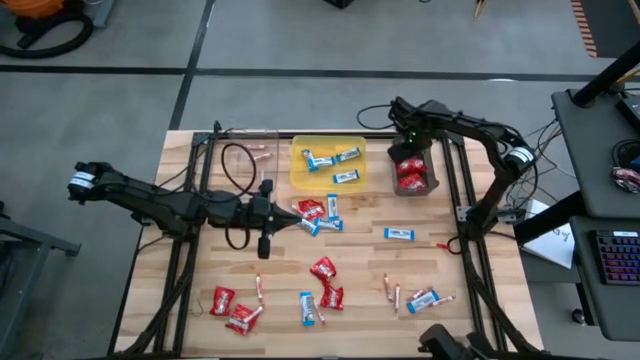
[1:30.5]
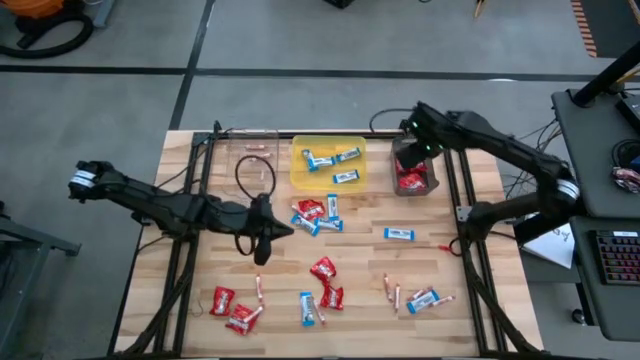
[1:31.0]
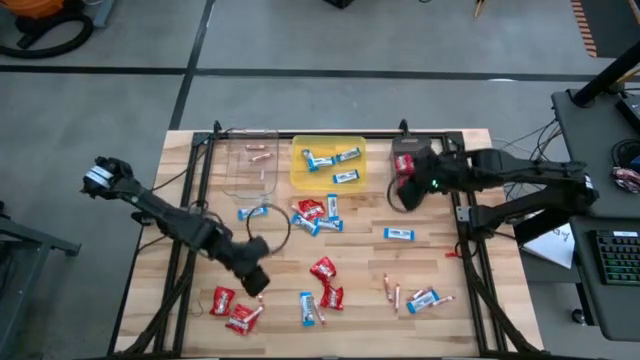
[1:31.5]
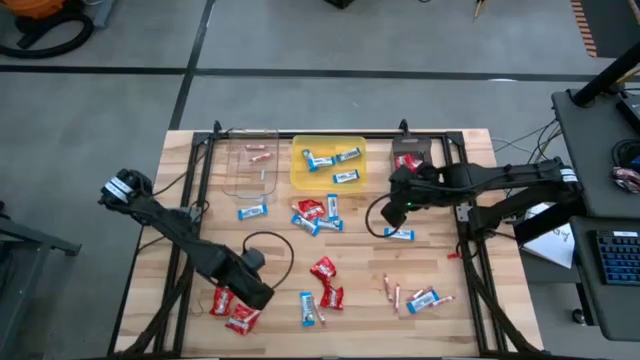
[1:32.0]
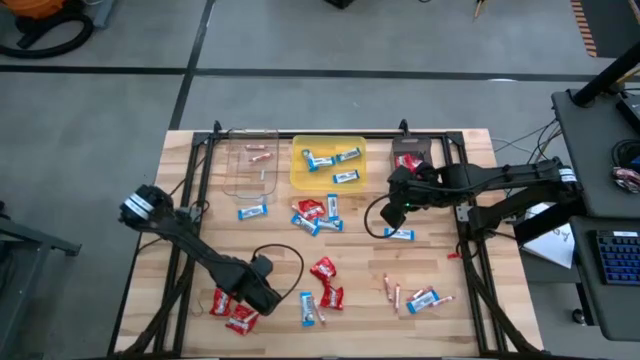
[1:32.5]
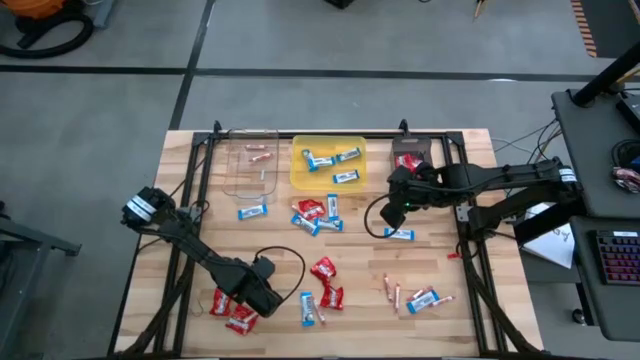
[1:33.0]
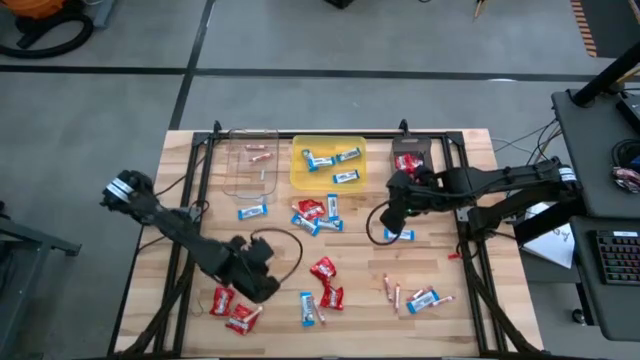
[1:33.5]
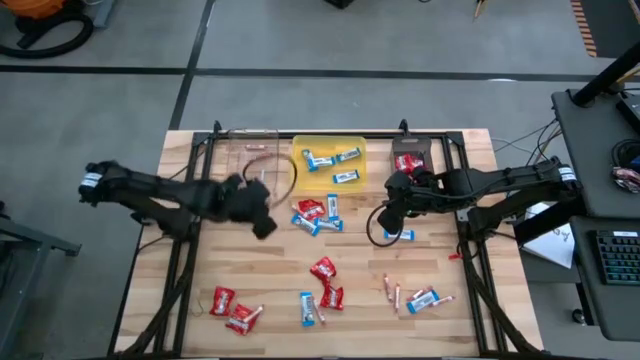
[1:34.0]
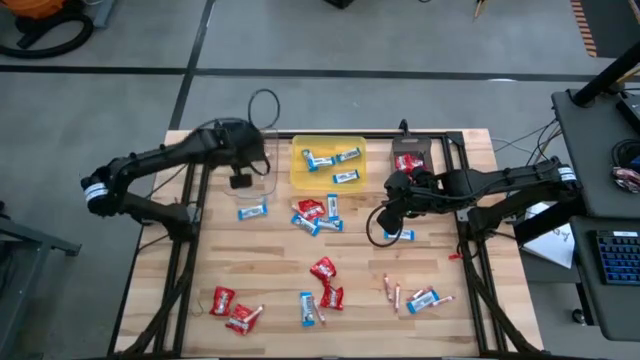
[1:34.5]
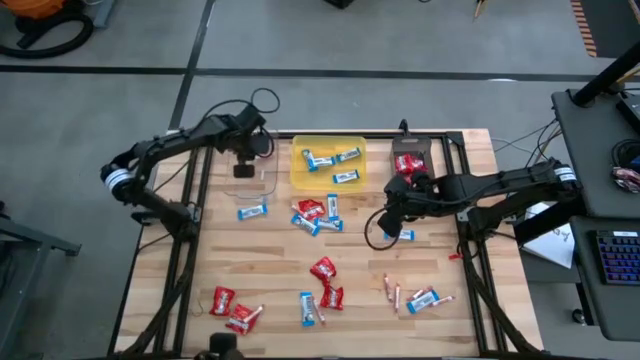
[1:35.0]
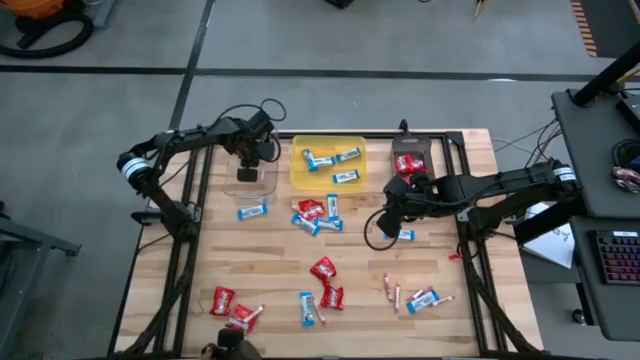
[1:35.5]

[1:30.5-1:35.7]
Task: Sort candy
Put the orange candy into the transparent bin

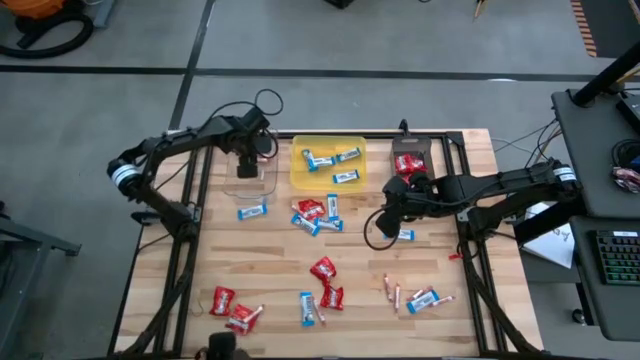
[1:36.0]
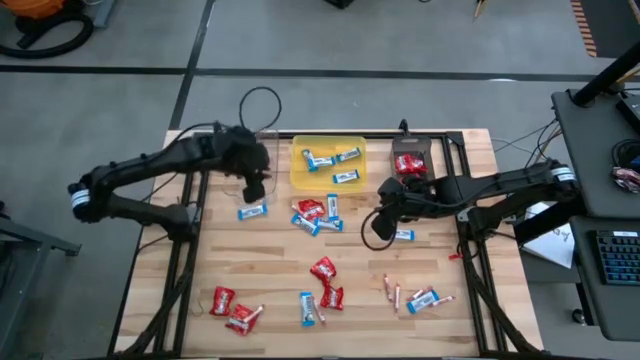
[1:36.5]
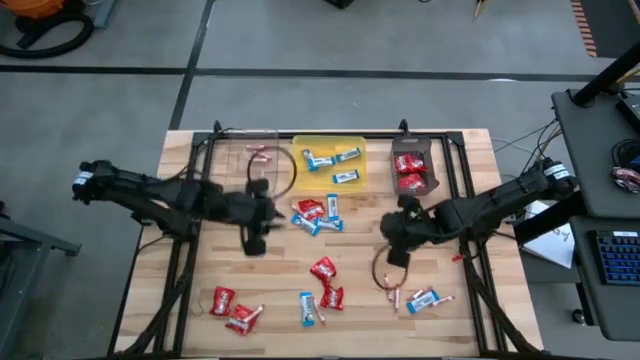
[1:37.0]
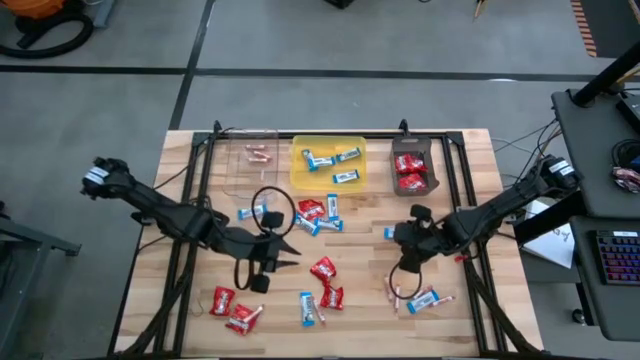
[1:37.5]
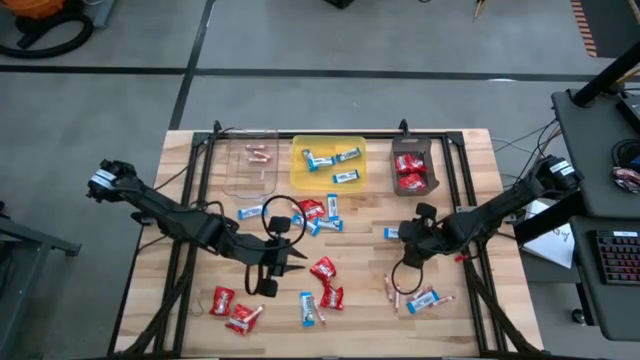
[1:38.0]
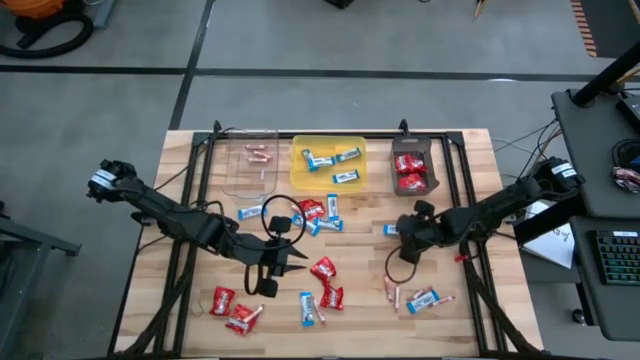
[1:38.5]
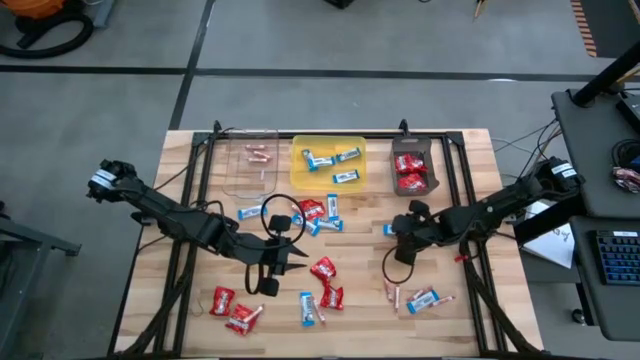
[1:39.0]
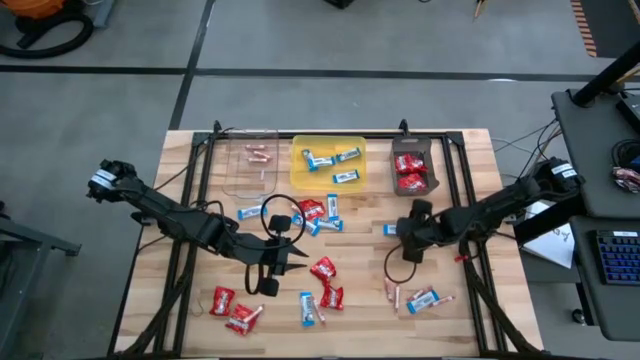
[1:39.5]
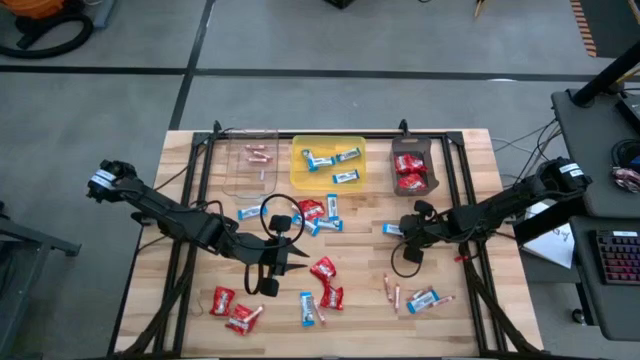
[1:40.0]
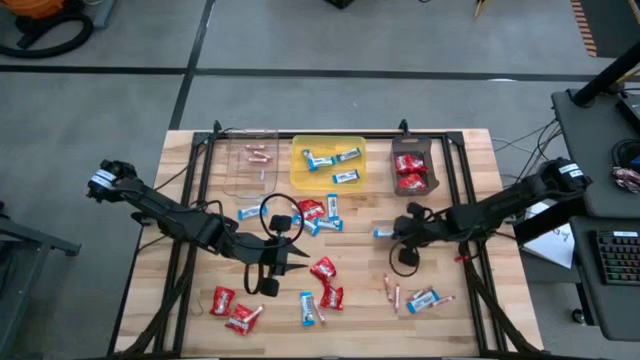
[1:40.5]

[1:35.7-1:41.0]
Put the white chocolate into the yellow bin

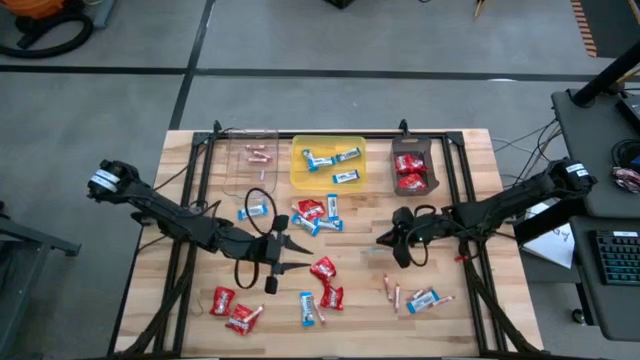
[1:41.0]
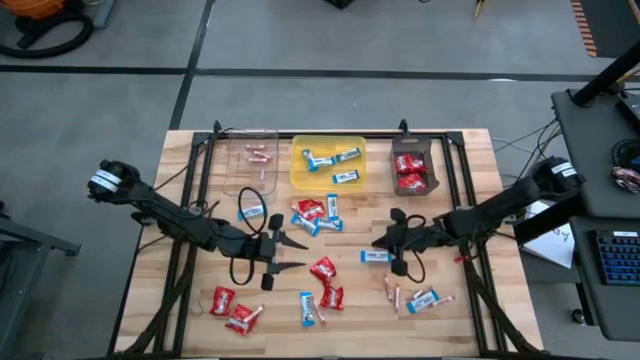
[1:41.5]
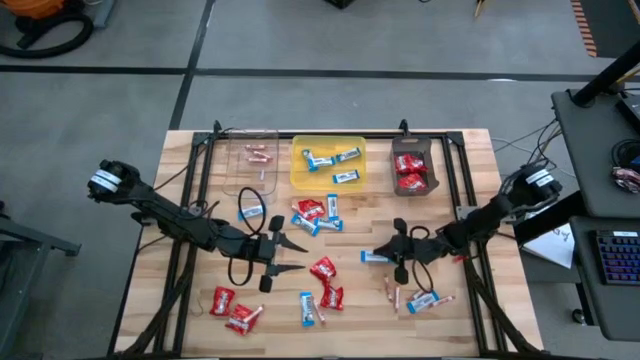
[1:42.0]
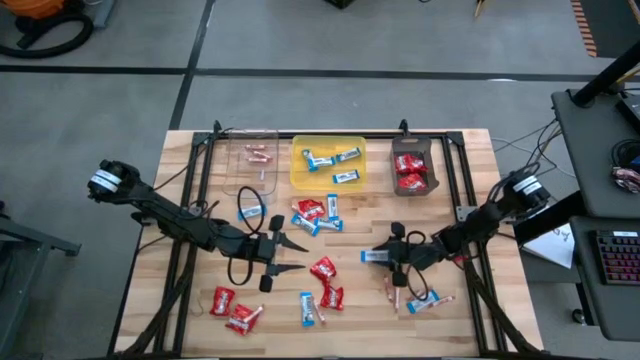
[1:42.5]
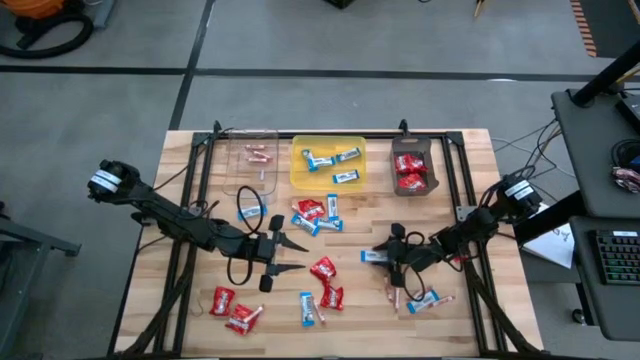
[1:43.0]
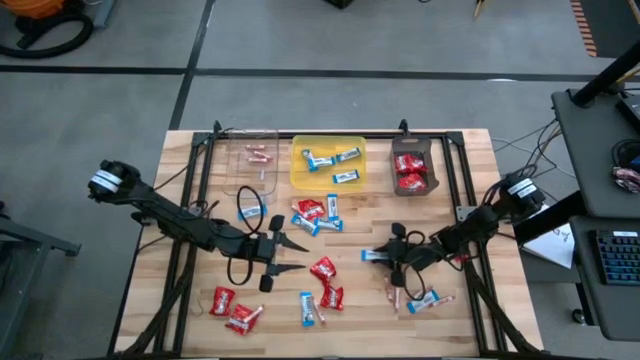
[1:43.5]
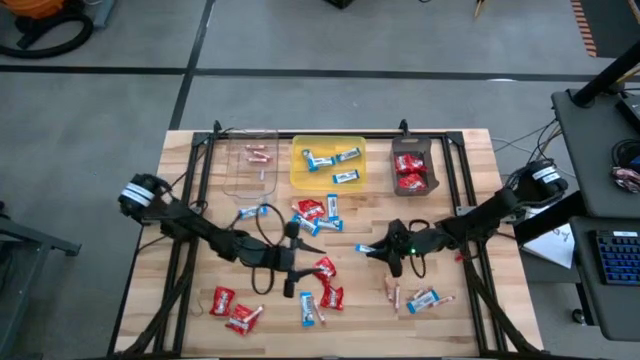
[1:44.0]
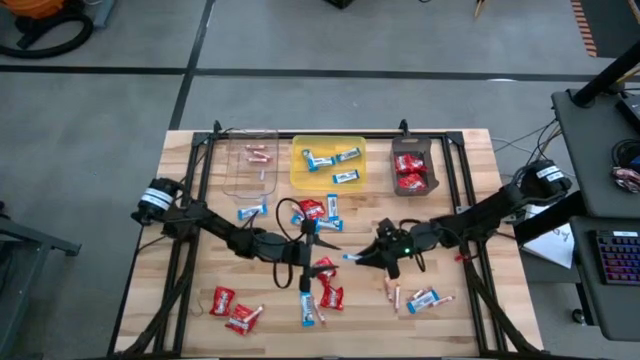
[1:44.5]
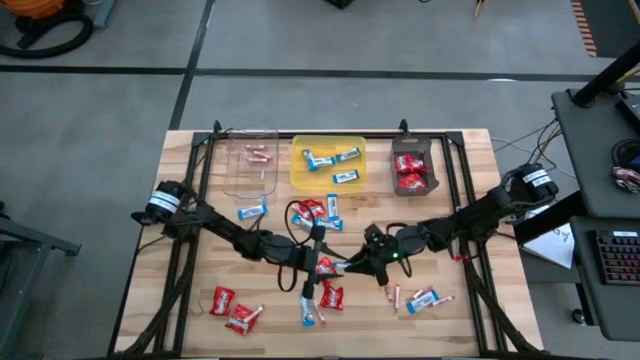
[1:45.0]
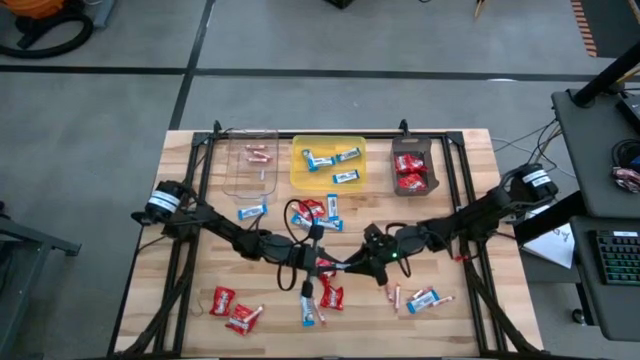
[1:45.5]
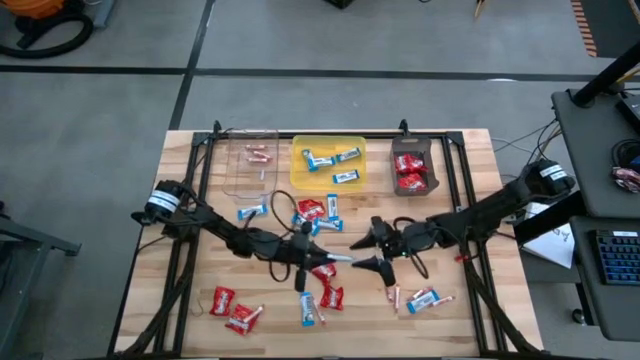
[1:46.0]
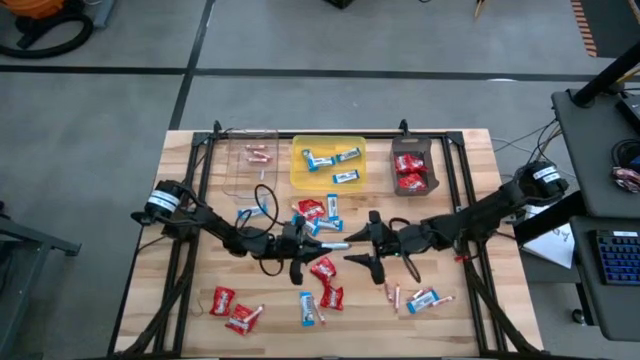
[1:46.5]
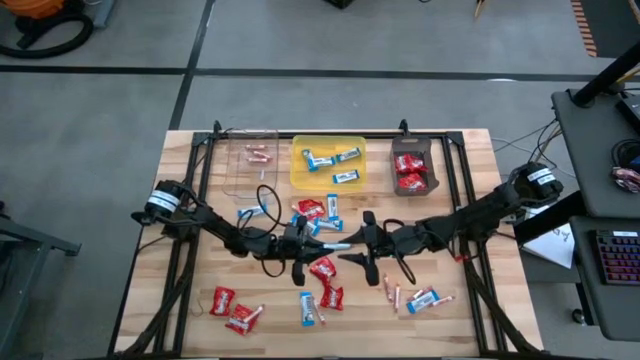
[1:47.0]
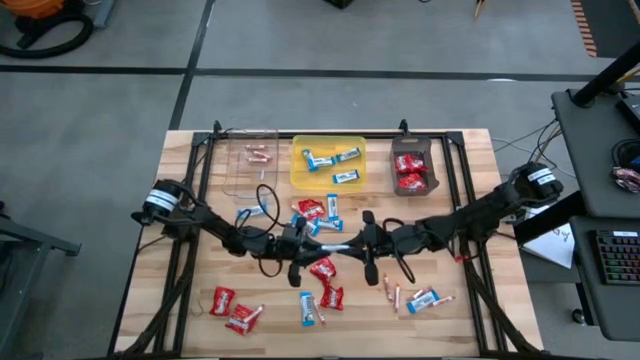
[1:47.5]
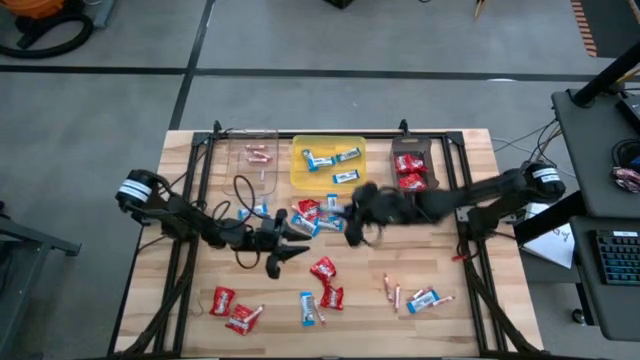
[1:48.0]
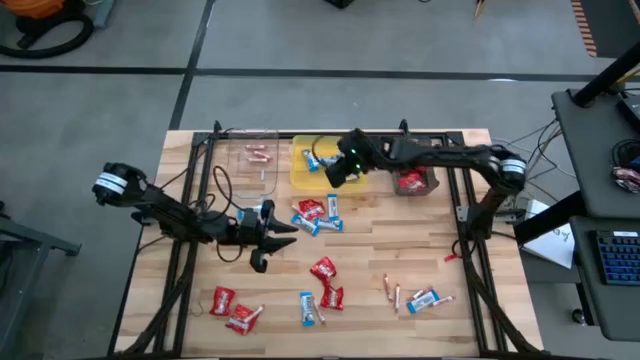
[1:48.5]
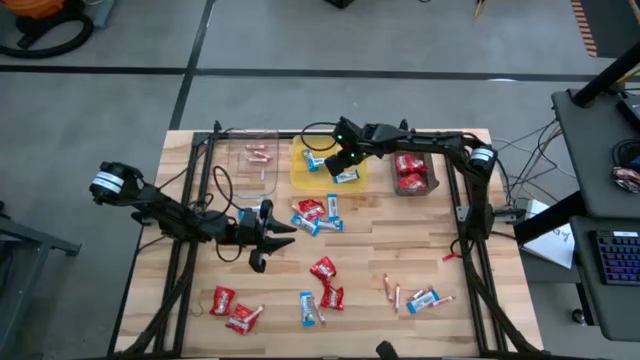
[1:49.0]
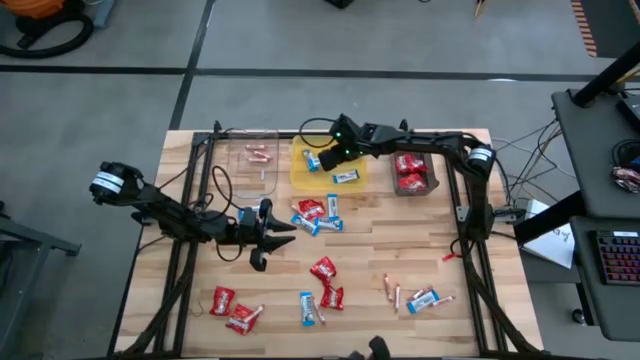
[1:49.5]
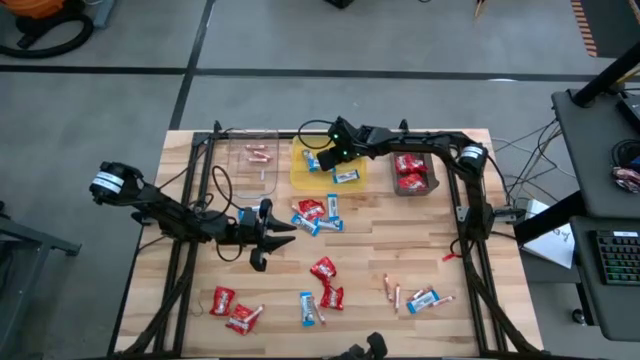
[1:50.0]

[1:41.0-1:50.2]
Put the white chocolate into the yellow bin

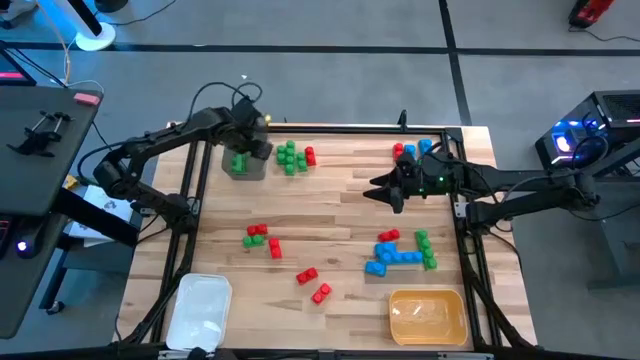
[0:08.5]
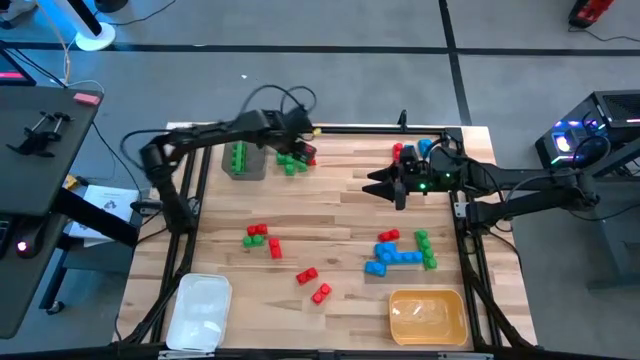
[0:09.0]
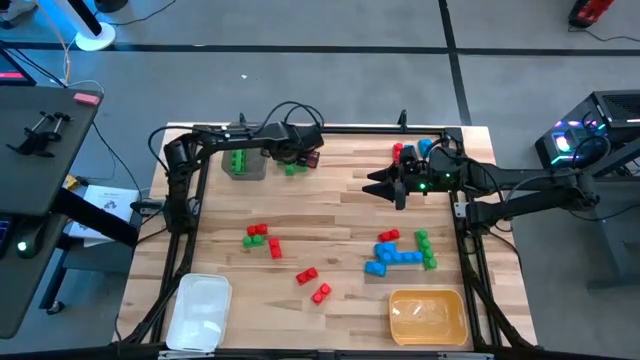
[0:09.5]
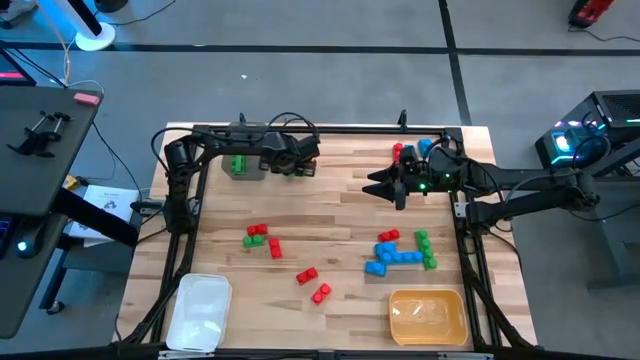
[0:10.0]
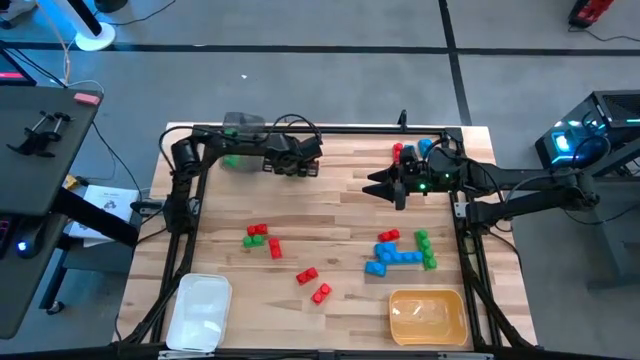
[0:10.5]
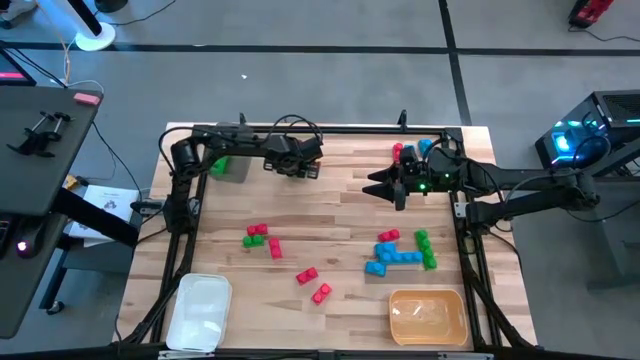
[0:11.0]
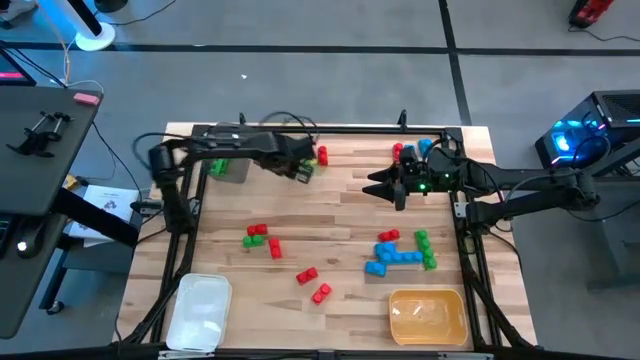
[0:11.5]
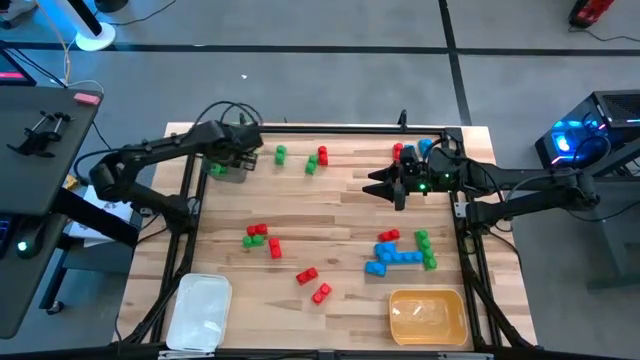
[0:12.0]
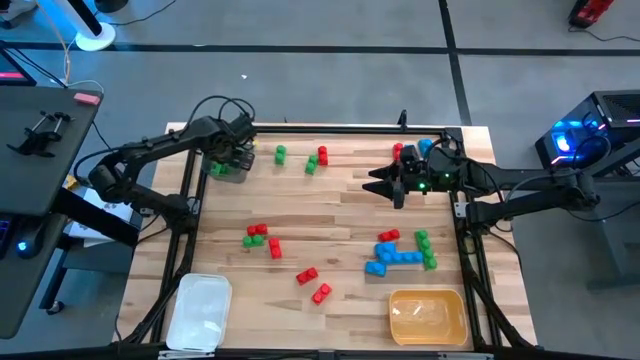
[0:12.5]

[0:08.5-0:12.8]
Task: Sort blocks
Put the green game piece into the black bin
